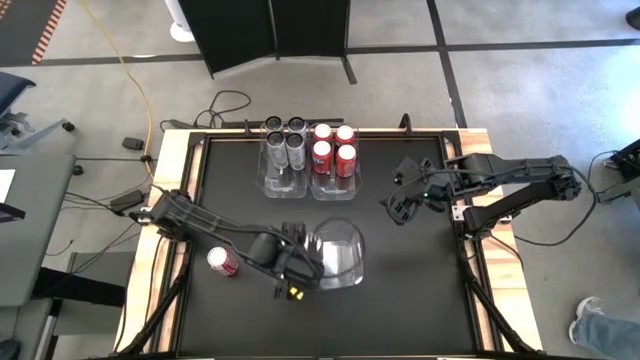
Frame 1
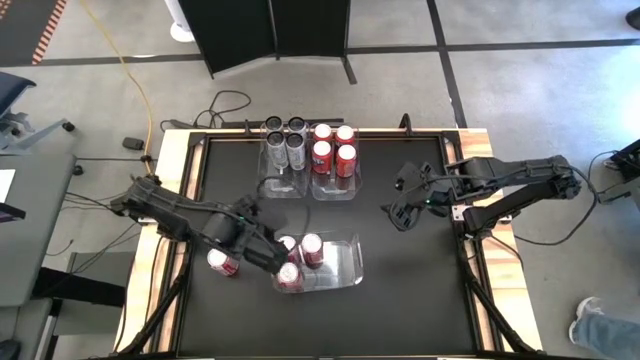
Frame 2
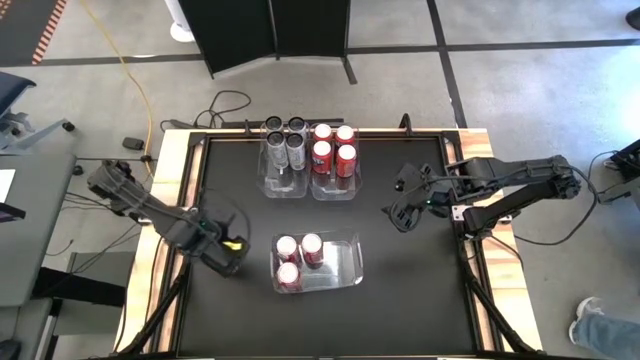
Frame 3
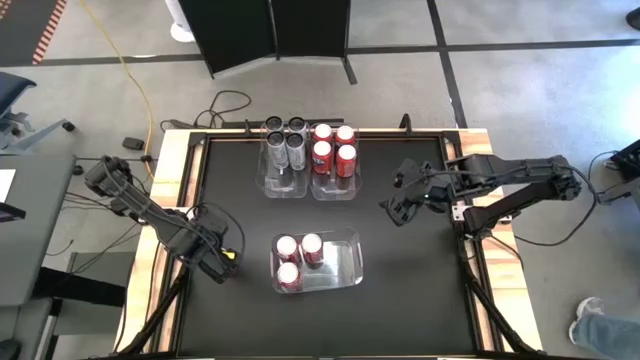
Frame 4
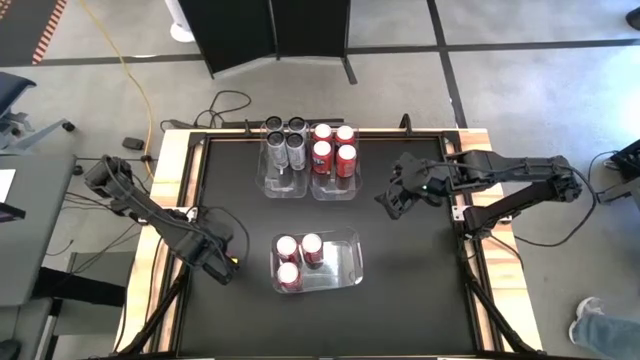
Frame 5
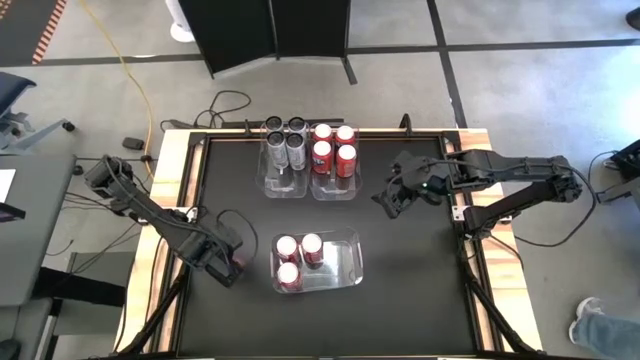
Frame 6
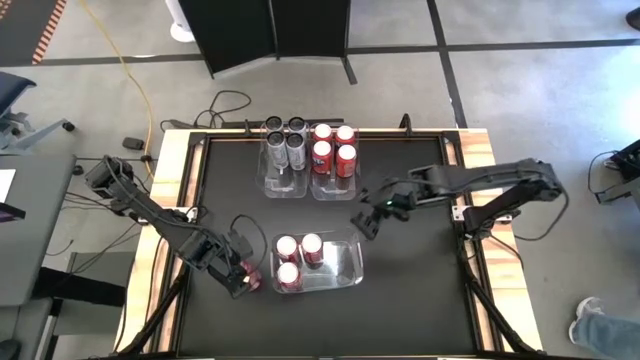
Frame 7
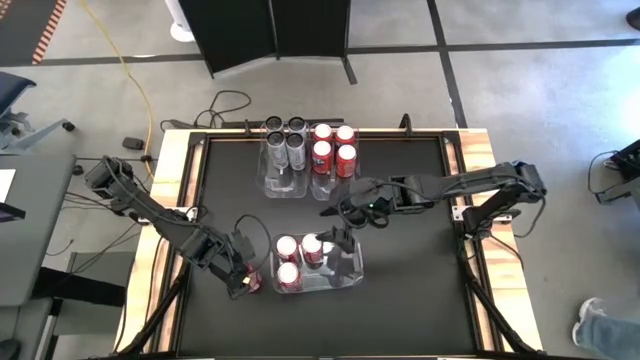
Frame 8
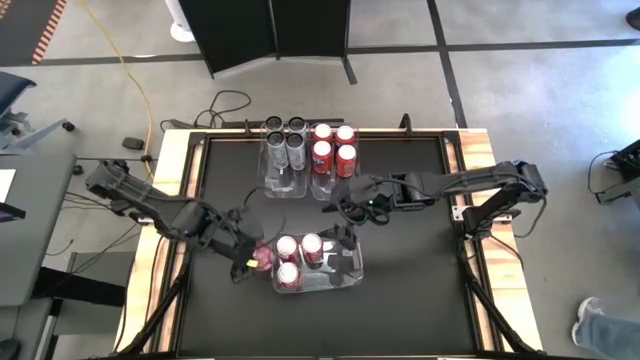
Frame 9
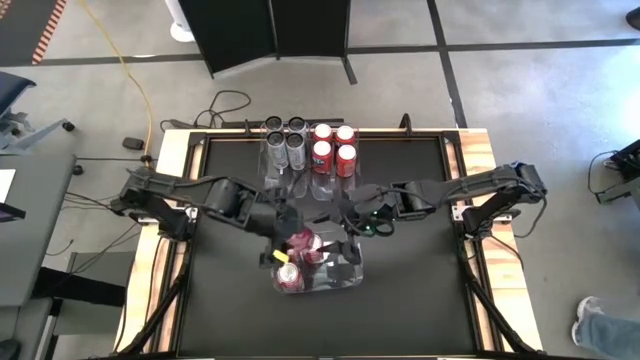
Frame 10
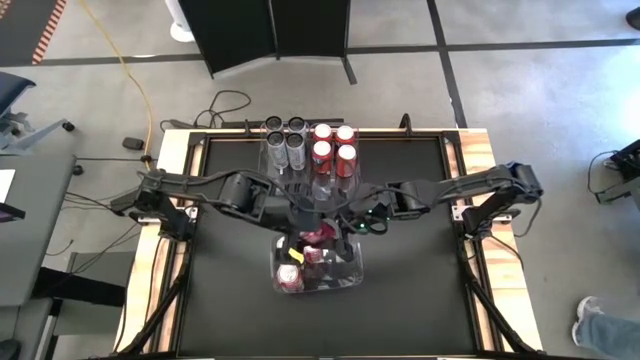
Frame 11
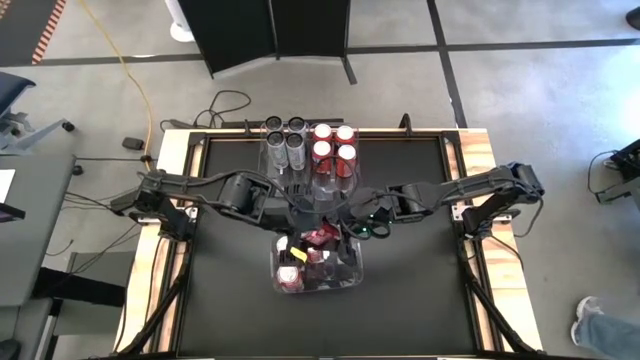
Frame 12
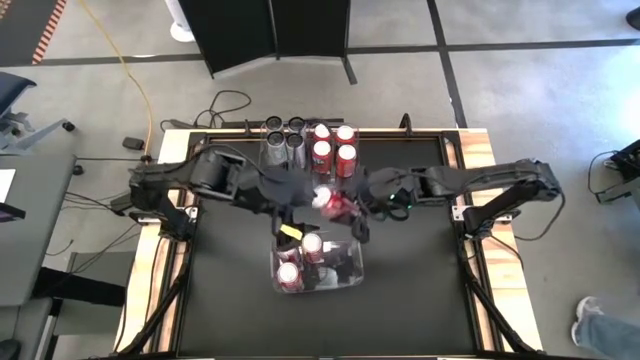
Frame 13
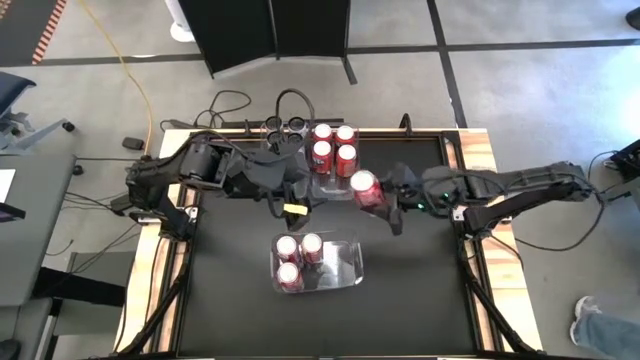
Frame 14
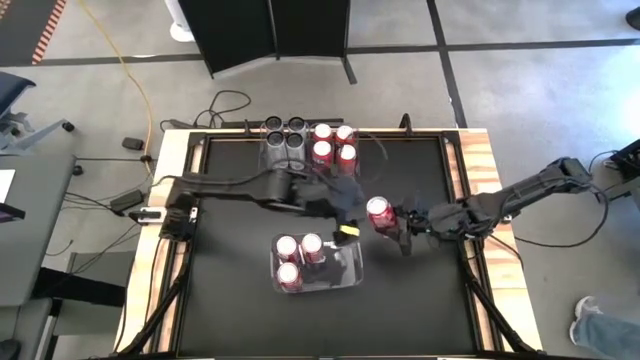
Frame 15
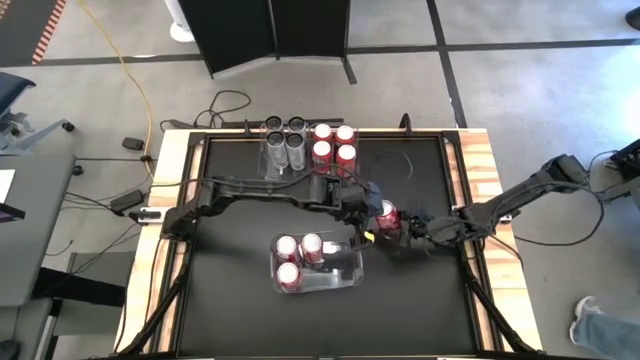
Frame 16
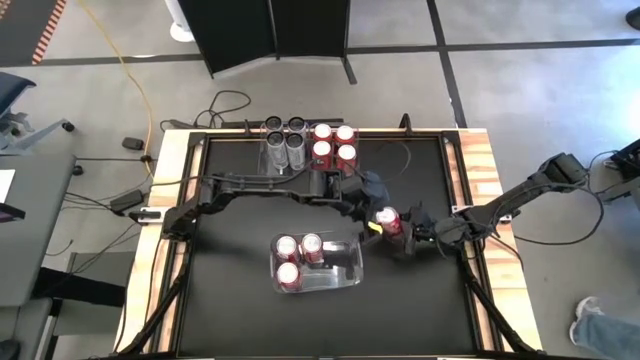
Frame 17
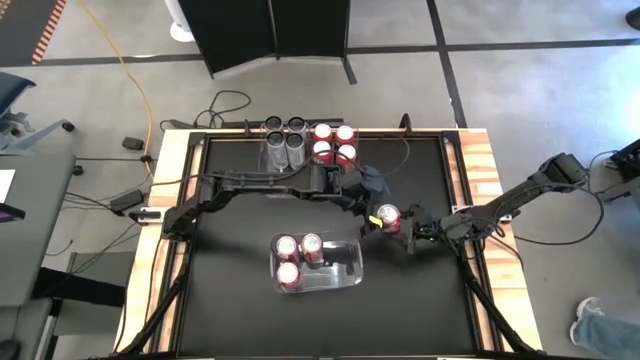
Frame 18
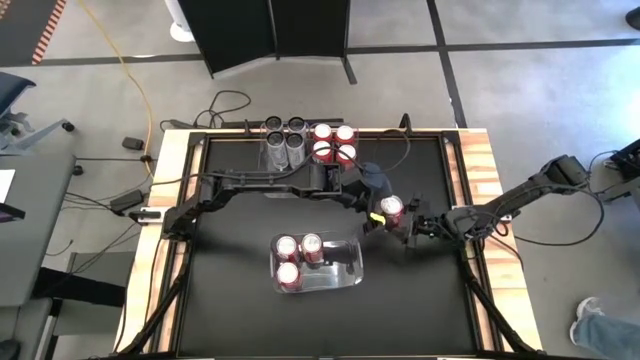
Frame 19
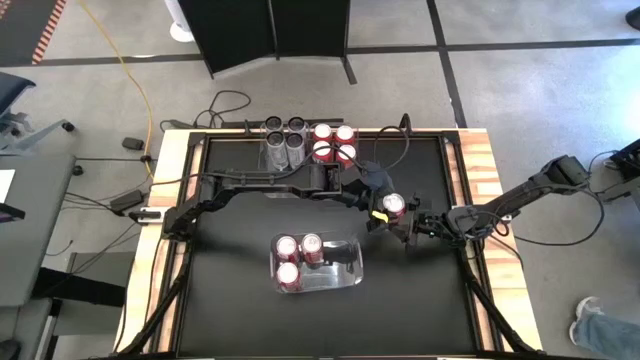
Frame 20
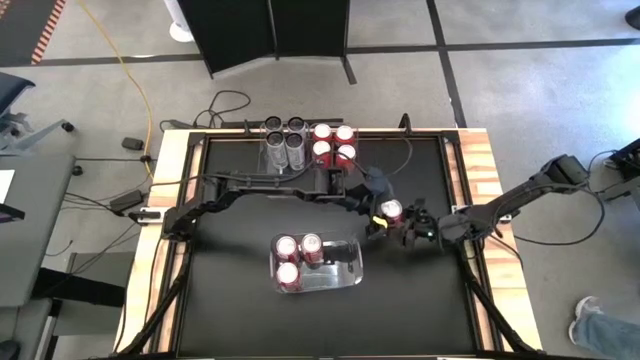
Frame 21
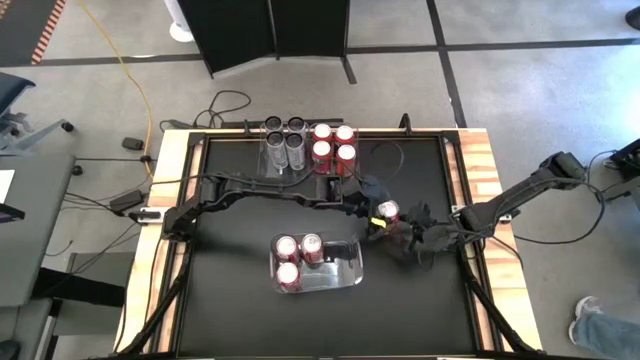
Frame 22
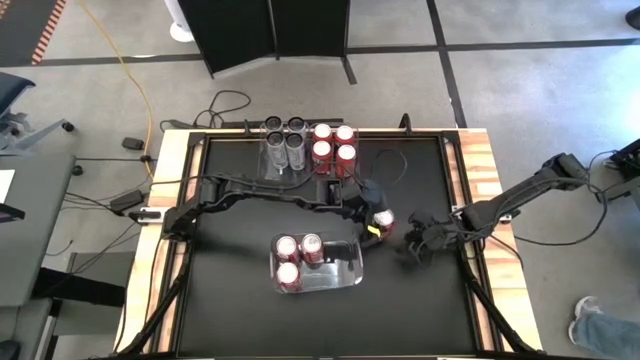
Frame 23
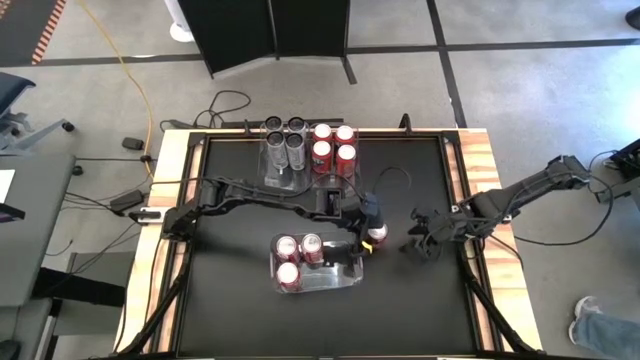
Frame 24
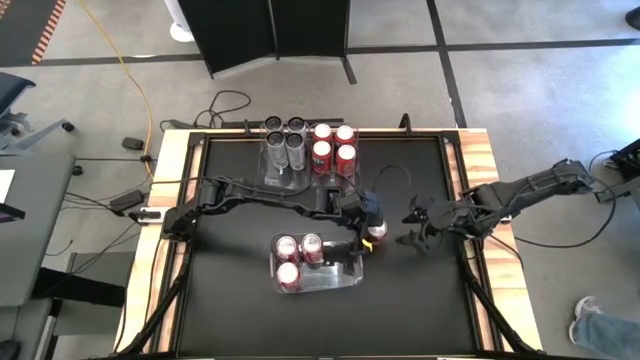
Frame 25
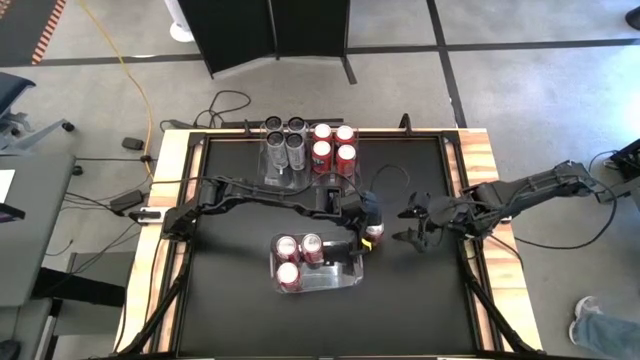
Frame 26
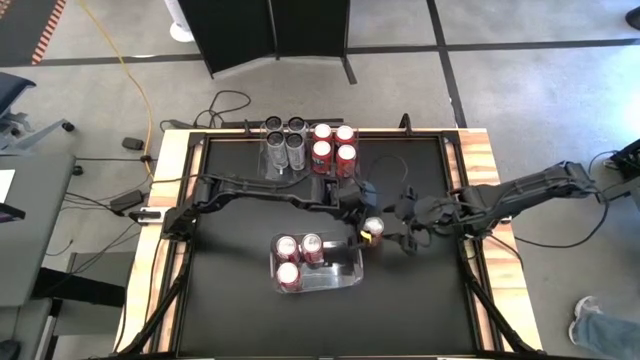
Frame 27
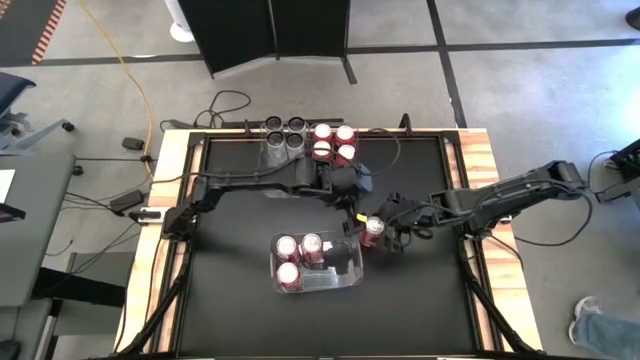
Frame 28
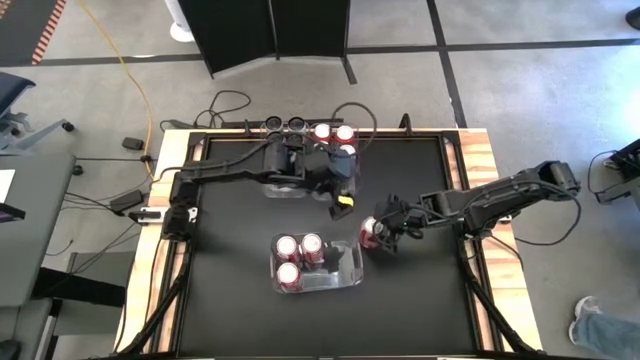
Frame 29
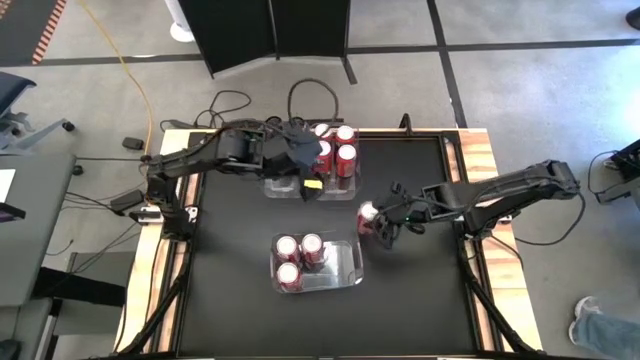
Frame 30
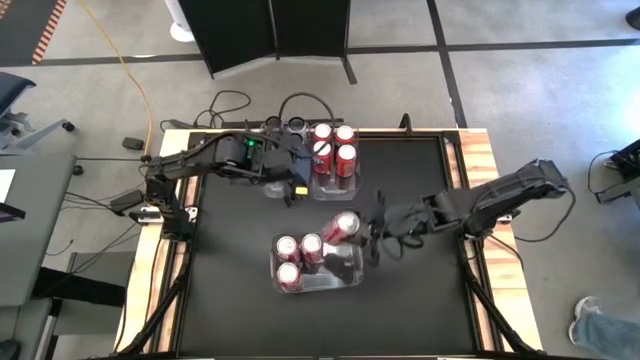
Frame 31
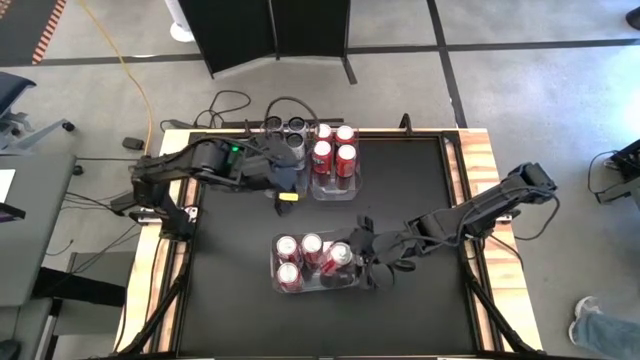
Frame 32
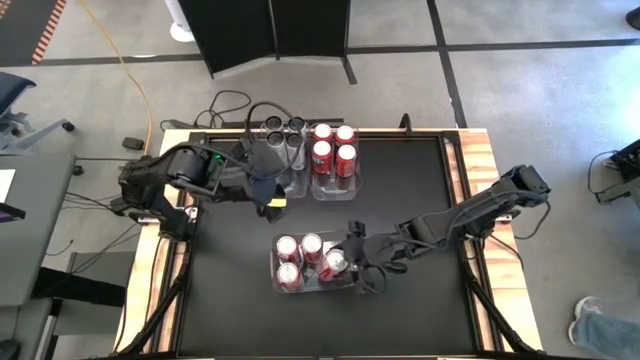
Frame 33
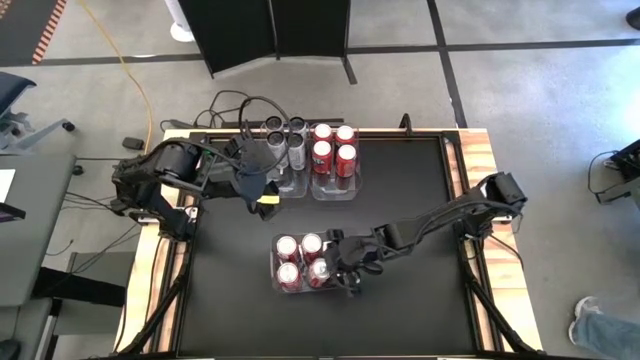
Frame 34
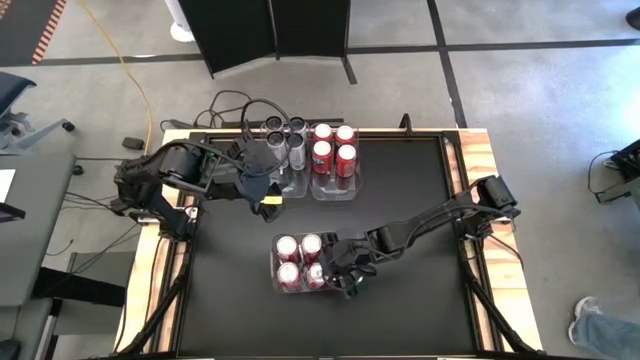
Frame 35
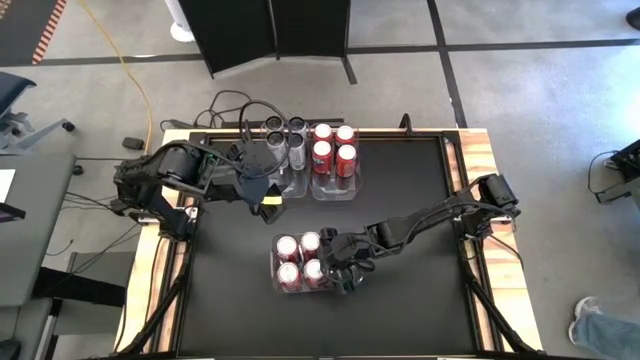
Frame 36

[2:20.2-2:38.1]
Task: Sort soda cans
Put the red-white soda can into the bottom transparent bin

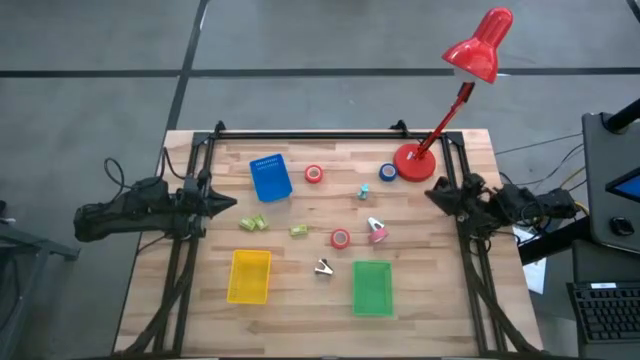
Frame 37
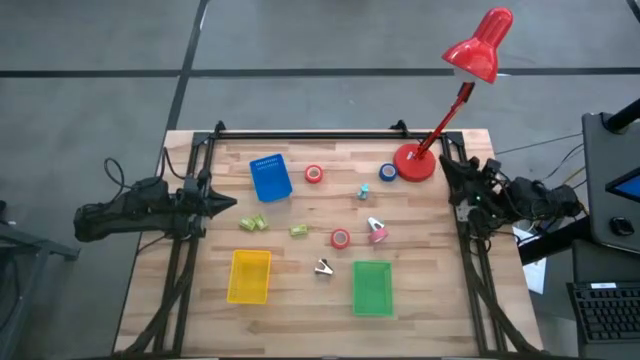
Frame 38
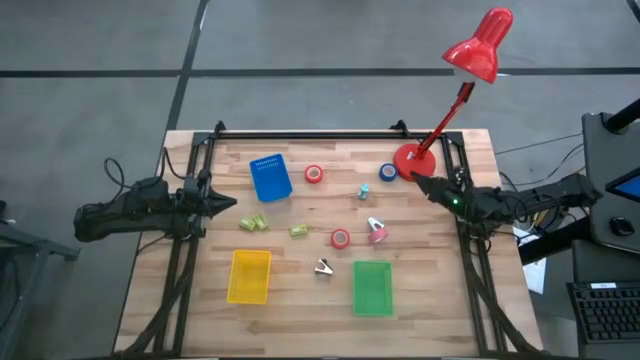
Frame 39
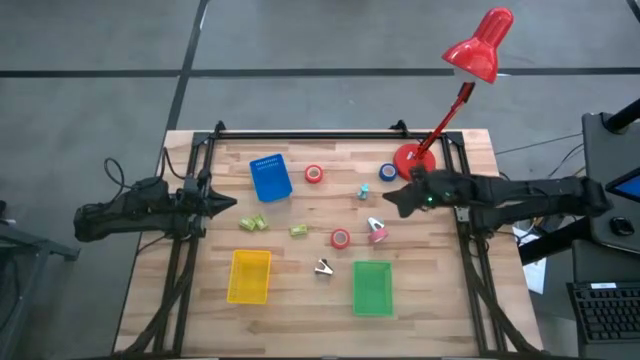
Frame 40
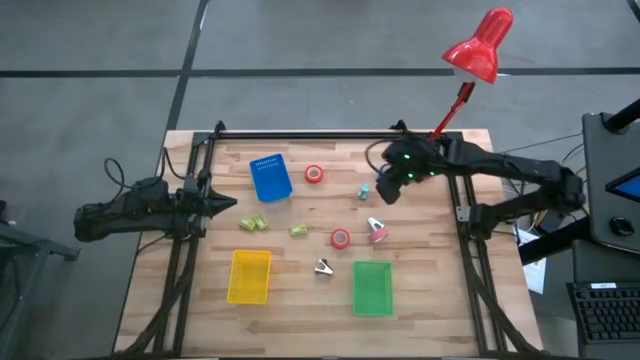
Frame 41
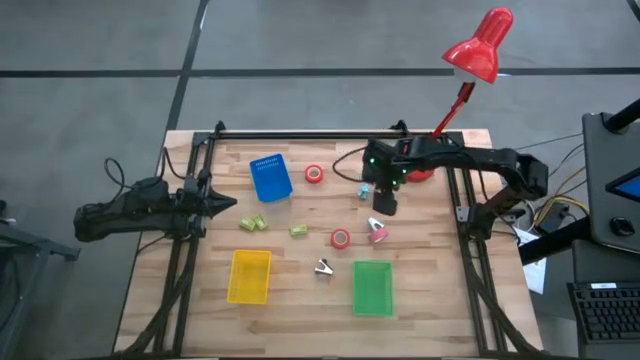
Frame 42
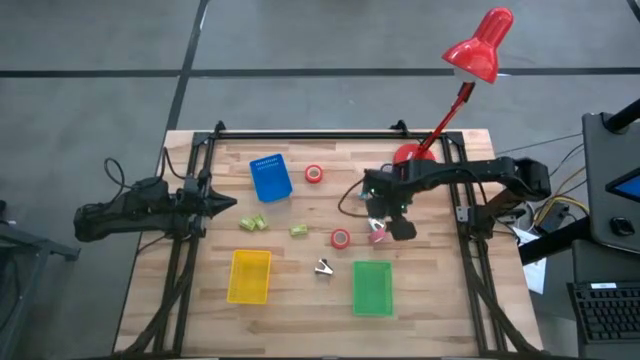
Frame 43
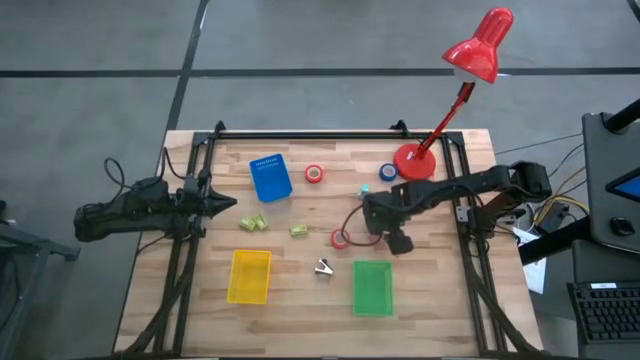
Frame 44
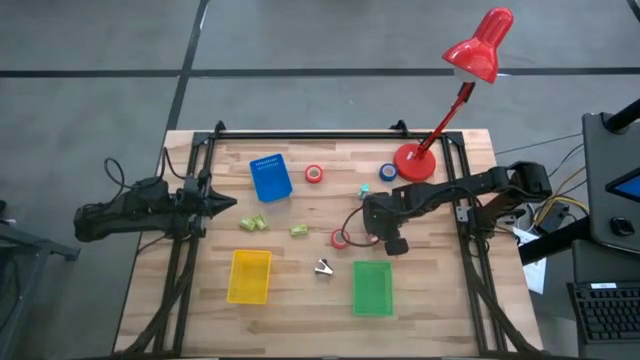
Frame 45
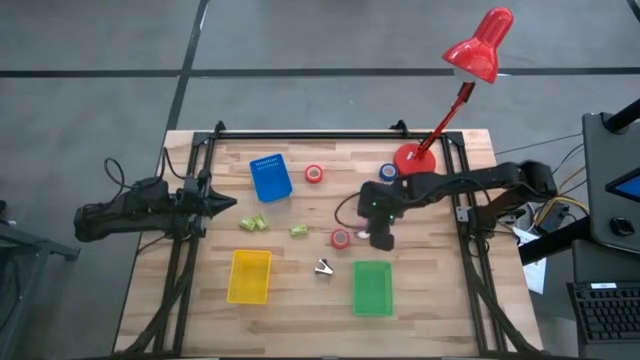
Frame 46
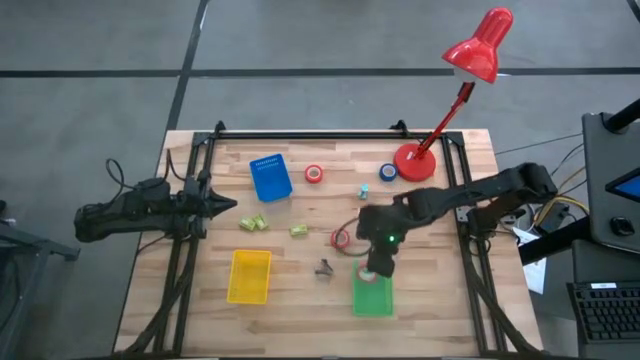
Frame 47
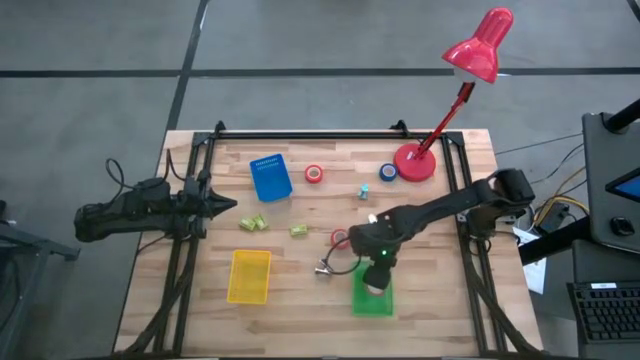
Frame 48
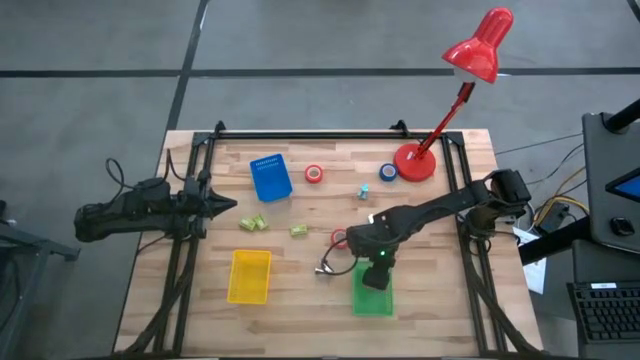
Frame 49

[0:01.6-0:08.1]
Task: Pick and place Stapler, Stapler remover, tape
Put the pink electrical tape into the green bin
